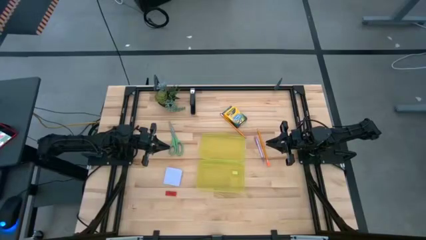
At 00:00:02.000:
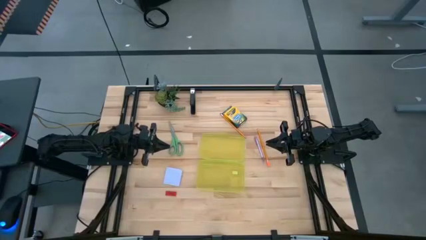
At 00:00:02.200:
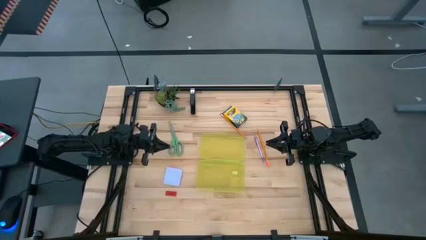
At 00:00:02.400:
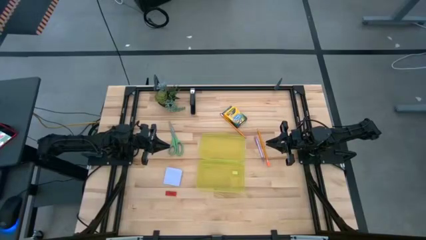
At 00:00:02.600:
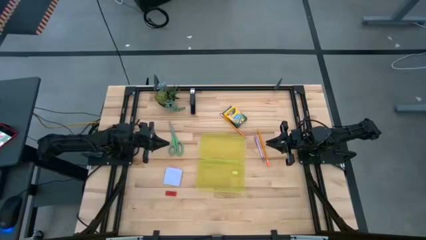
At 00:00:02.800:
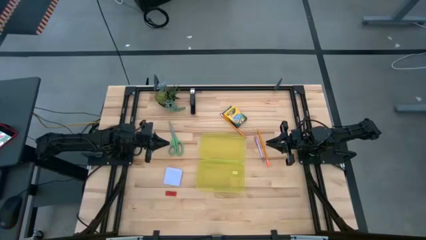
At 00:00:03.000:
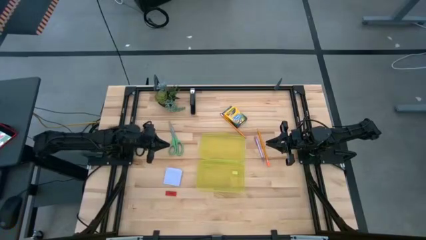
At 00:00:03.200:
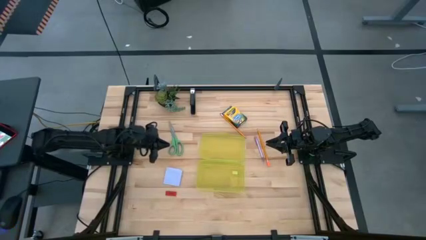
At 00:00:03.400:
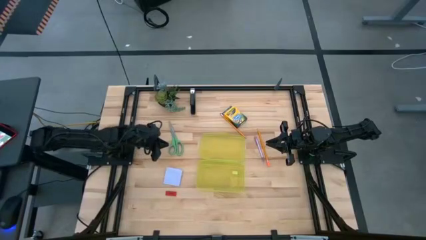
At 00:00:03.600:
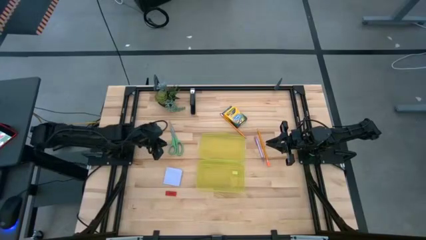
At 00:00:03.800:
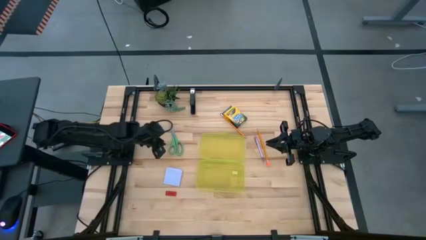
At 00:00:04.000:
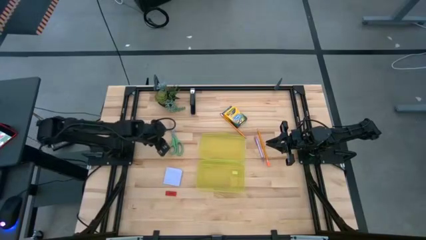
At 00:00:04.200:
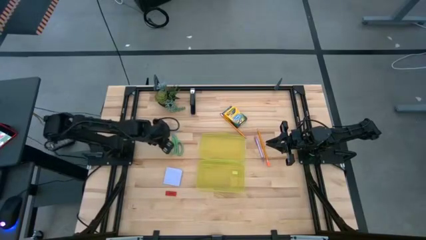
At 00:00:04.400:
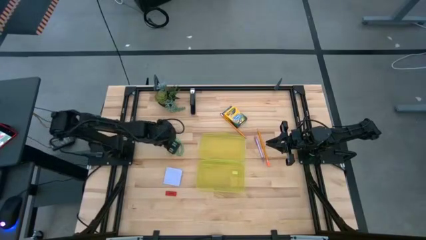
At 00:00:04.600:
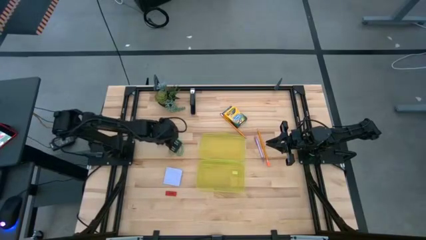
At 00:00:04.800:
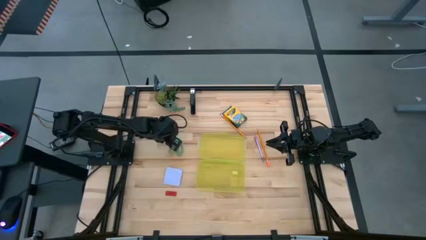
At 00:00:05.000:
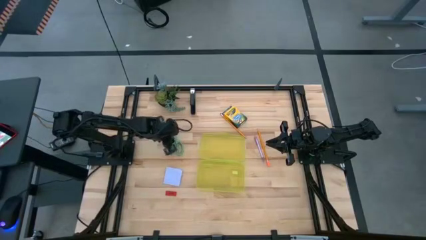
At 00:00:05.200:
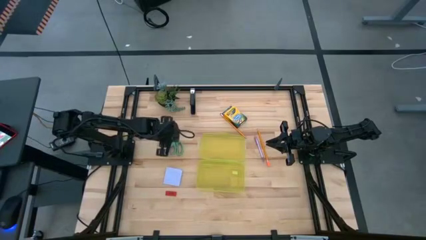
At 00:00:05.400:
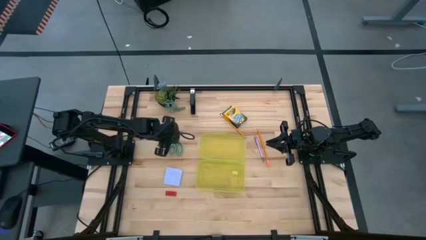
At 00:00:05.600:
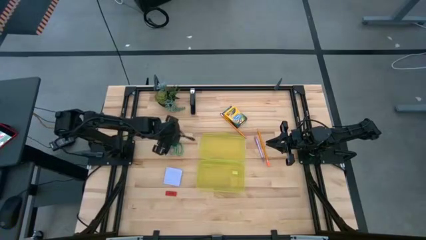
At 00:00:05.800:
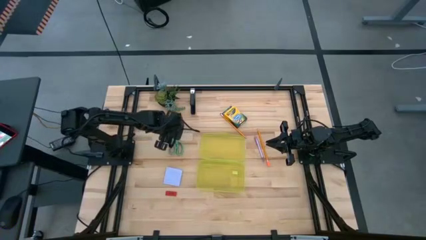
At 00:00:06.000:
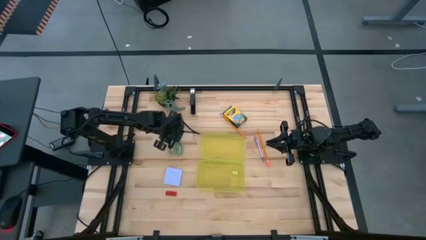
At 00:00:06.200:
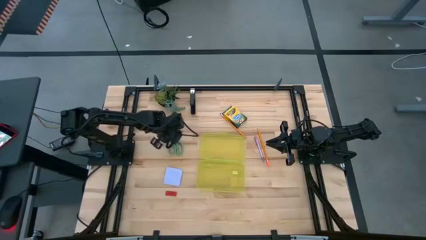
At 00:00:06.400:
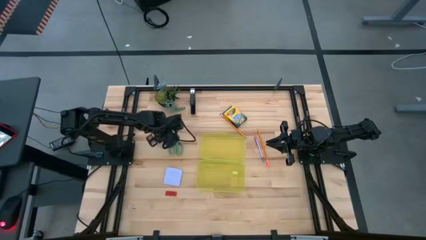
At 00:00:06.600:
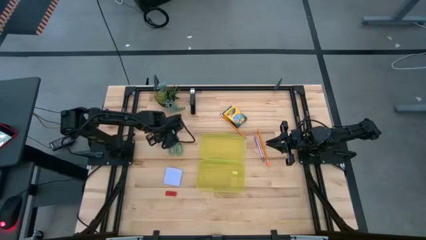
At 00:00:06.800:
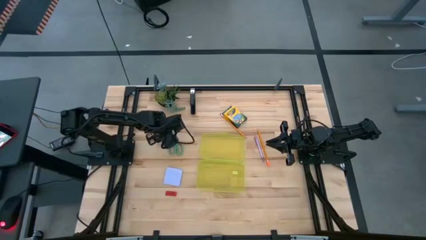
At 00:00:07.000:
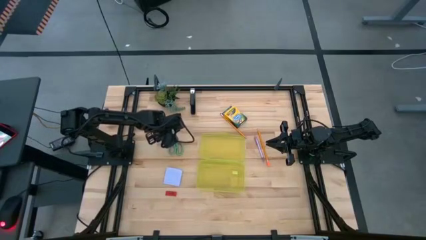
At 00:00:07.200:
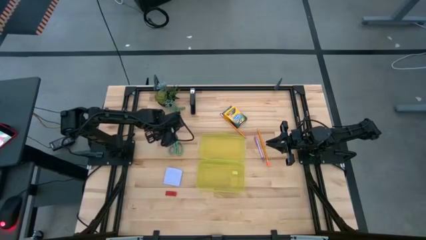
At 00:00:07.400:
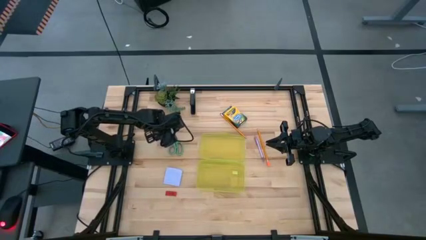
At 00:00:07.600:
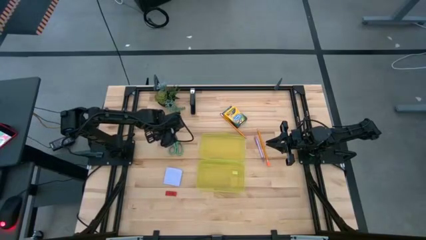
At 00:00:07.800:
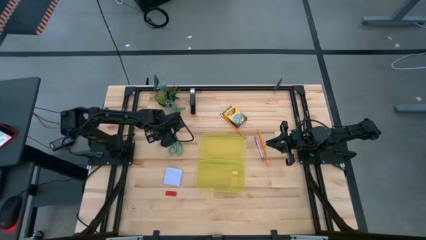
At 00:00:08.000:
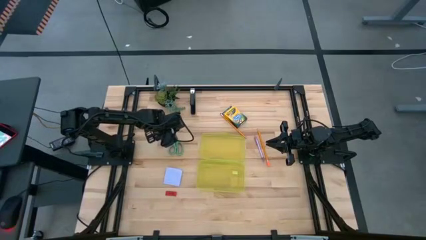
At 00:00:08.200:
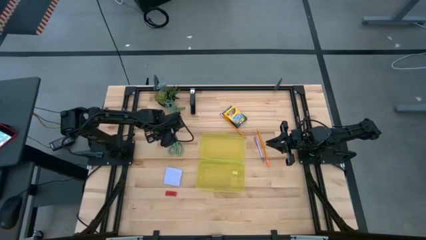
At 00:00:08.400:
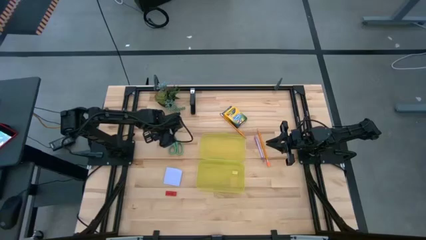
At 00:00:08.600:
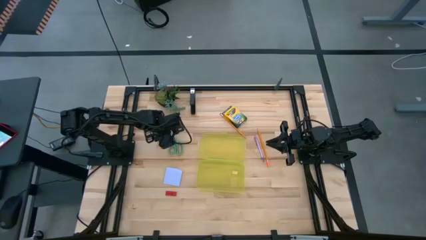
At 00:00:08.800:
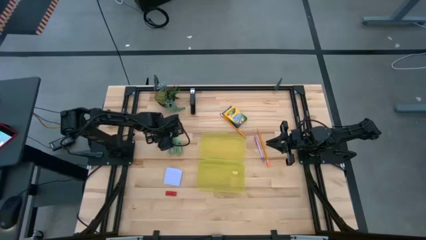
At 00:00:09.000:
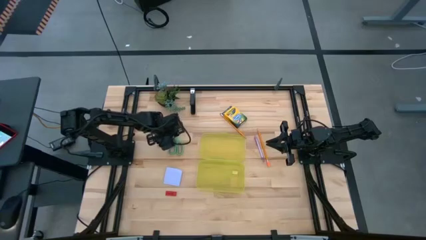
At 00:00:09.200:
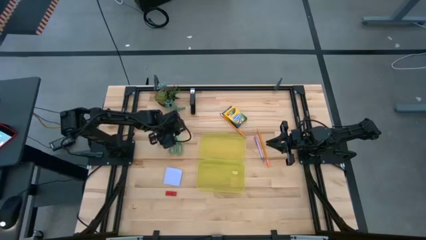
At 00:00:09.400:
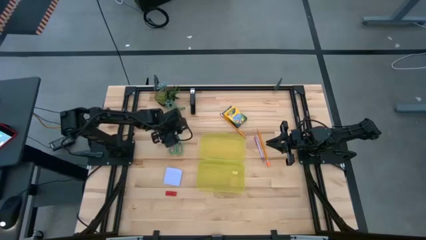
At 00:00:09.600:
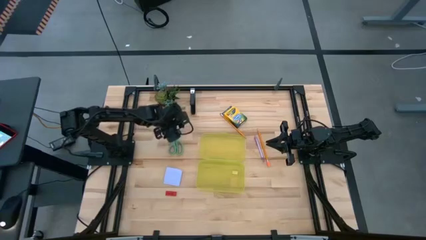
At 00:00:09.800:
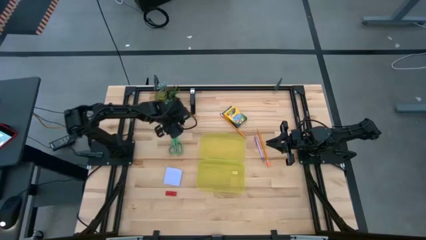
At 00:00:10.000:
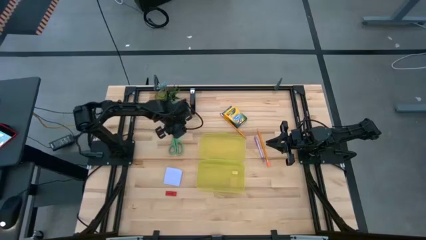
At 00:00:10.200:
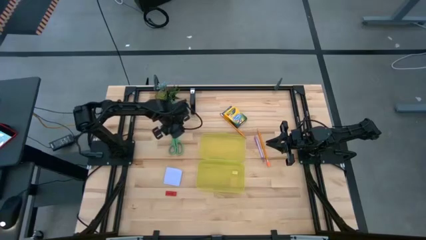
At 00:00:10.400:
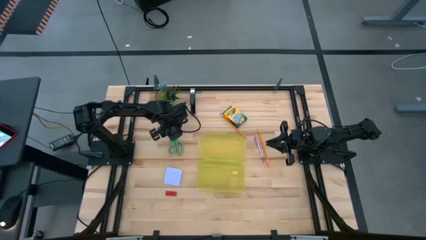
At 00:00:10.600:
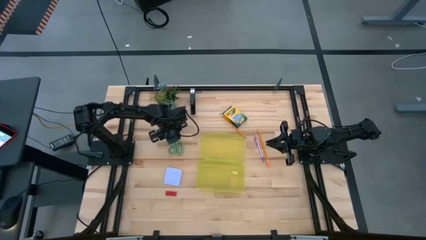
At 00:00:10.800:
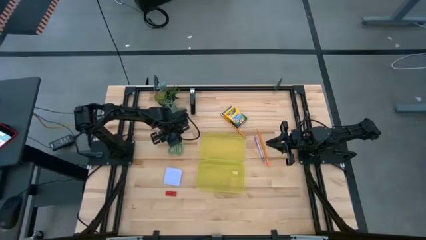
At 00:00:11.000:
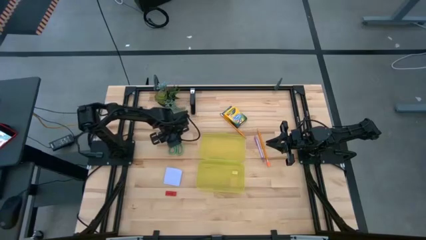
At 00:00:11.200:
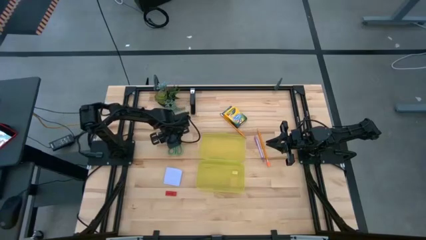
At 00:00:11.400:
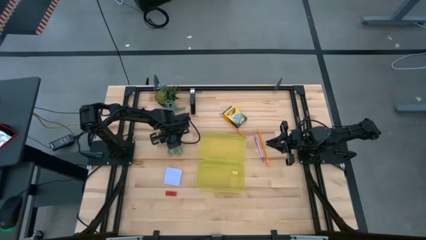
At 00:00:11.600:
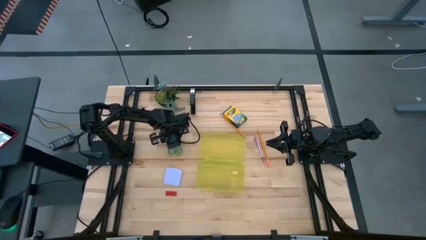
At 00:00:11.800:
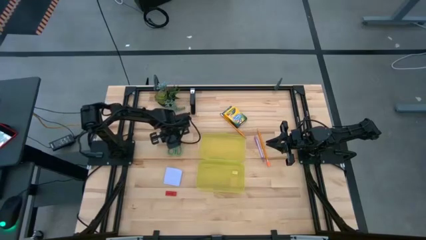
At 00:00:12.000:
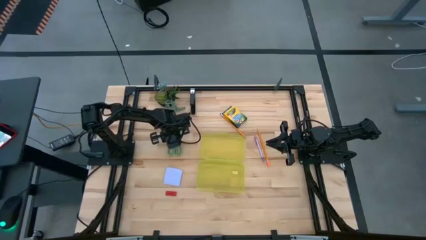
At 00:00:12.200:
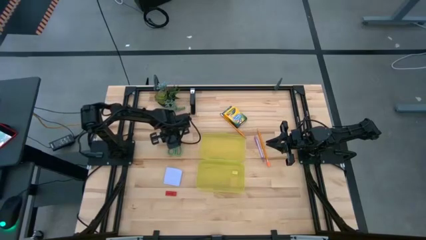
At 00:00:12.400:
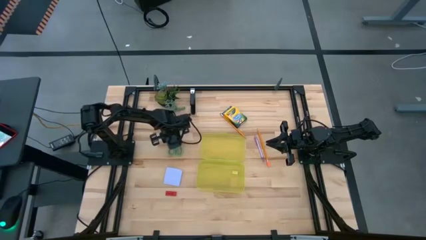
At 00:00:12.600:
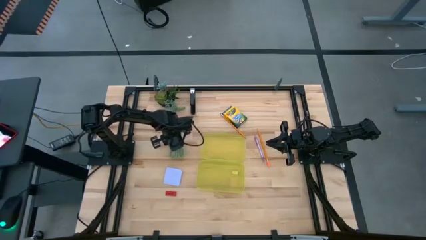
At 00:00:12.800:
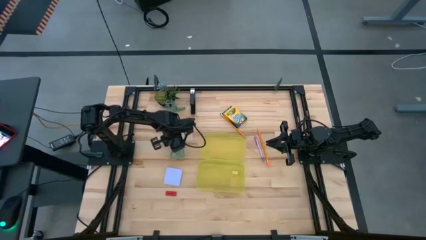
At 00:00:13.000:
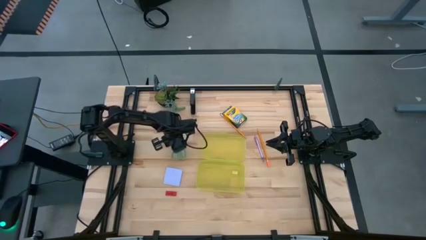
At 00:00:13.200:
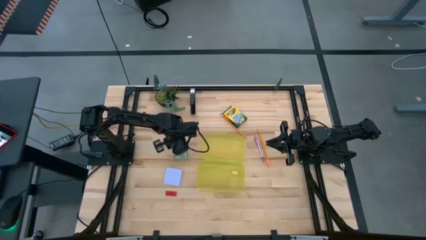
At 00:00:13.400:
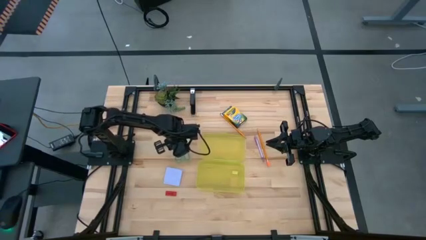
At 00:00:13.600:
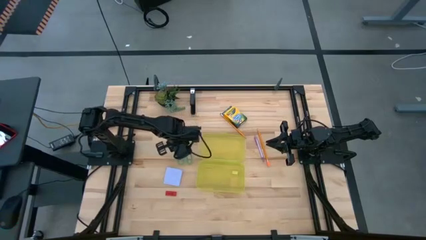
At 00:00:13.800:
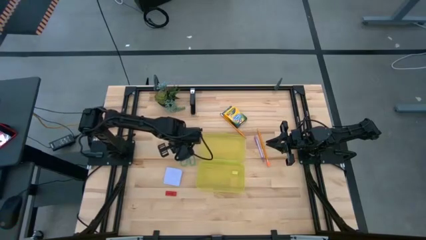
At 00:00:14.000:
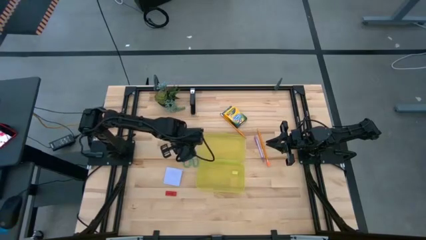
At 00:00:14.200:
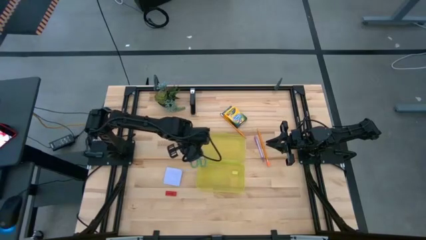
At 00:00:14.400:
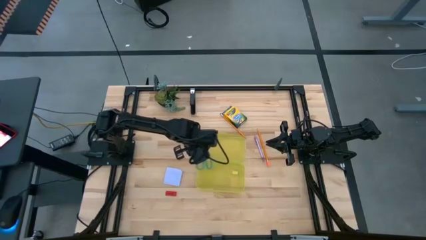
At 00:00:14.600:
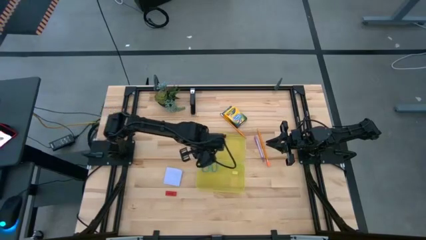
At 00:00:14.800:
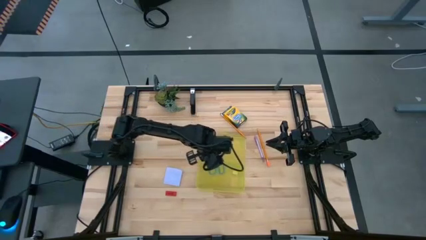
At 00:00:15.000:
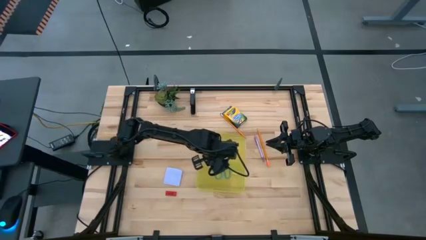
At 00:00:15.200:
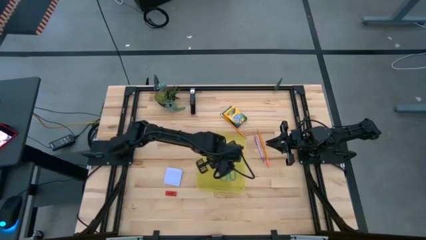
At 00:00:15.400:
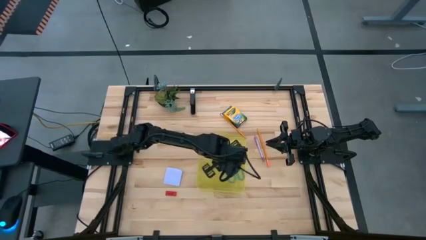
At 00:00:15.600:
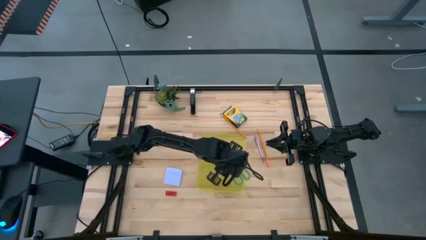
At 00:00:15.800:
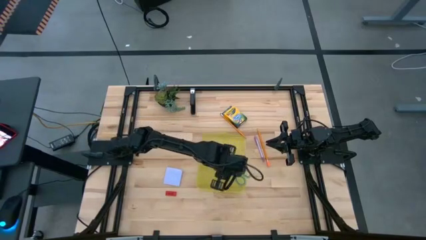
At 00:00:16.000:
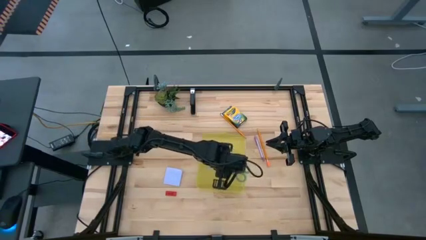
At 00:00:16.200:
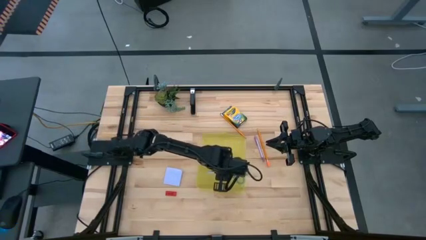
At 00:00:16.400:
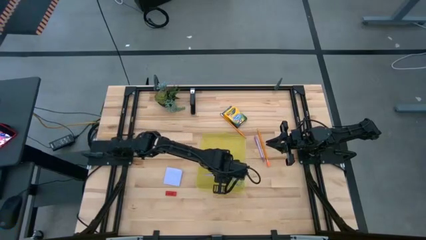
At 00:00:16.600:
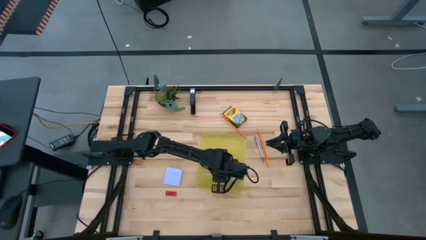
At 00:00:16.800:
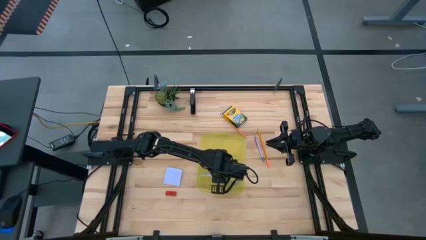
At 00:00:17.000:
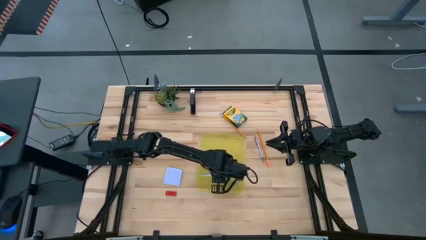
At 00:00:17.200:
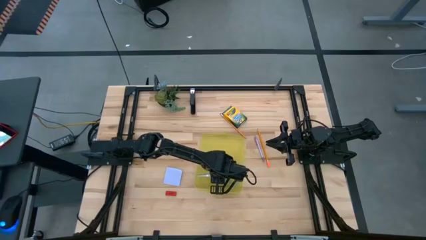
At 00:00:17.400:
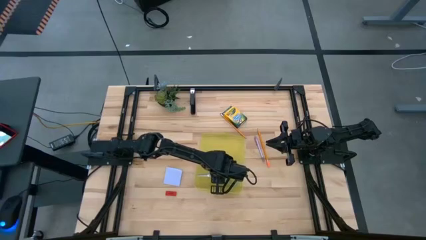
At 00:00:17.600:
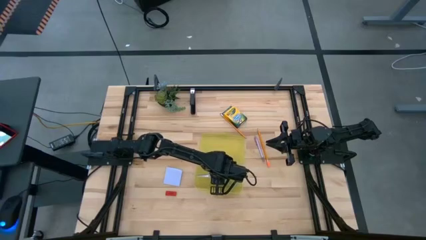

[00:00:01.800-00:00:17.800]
Task: Pack school essentials
Put the green scissors into the yellow supply box
